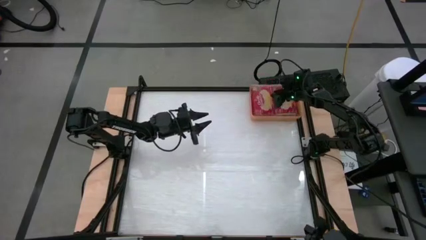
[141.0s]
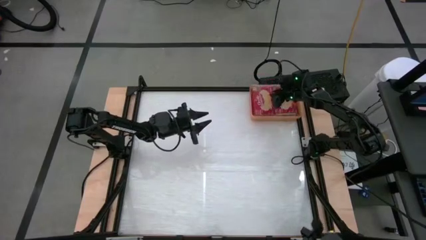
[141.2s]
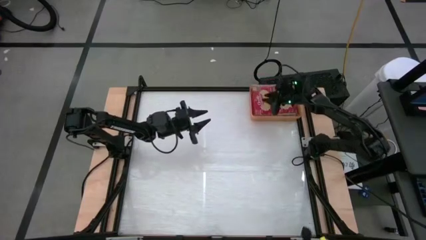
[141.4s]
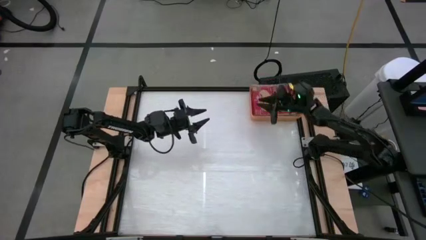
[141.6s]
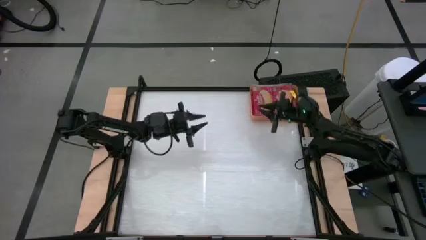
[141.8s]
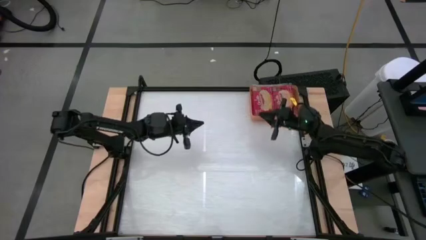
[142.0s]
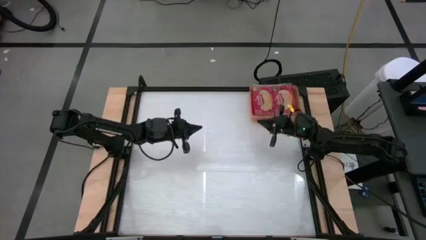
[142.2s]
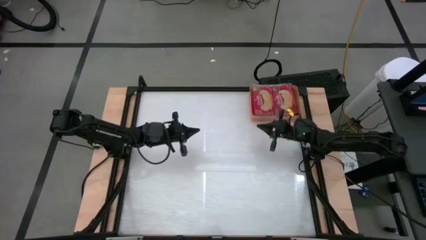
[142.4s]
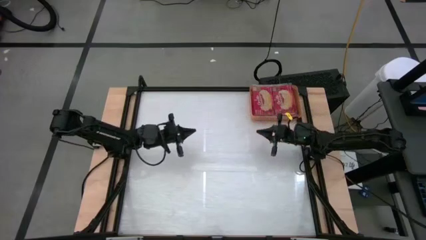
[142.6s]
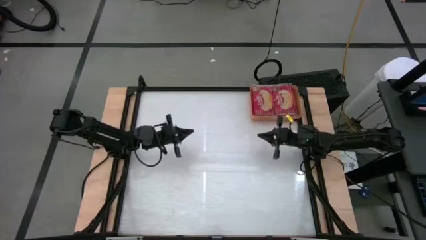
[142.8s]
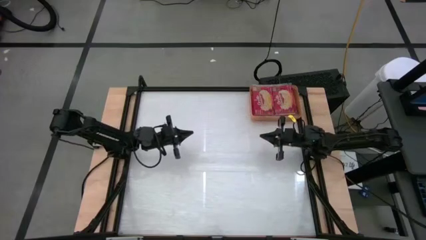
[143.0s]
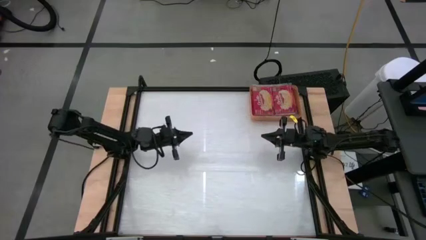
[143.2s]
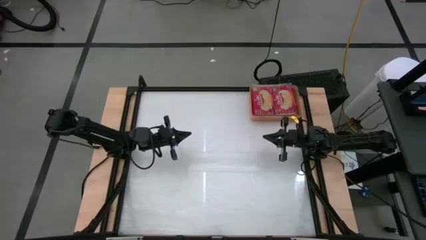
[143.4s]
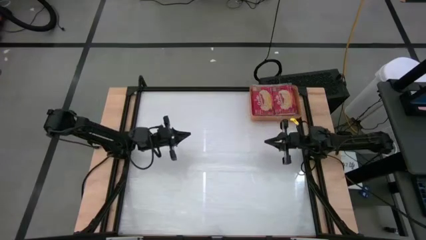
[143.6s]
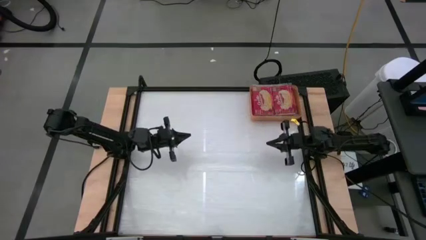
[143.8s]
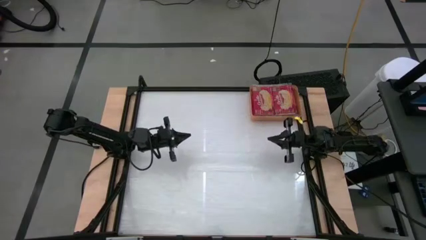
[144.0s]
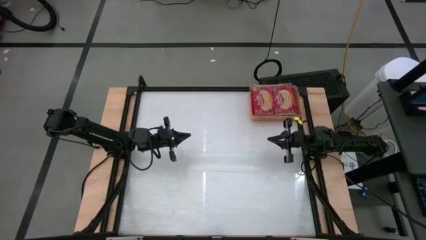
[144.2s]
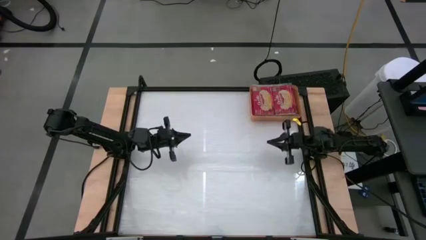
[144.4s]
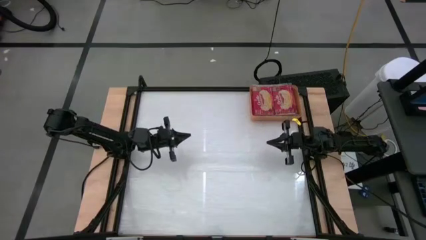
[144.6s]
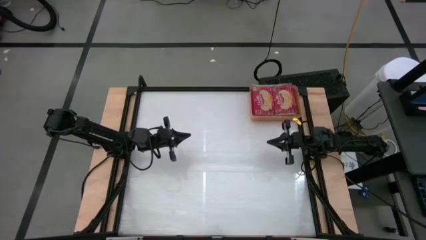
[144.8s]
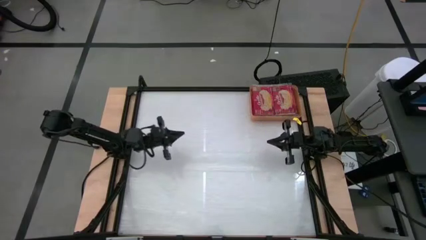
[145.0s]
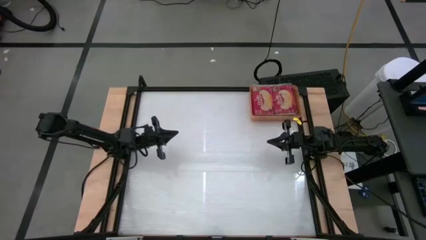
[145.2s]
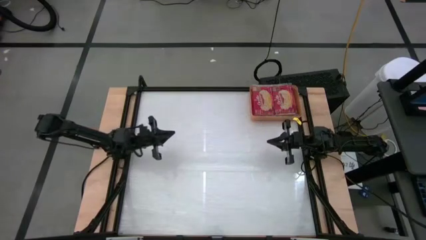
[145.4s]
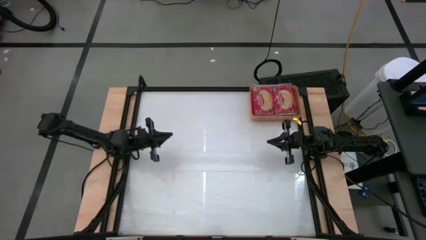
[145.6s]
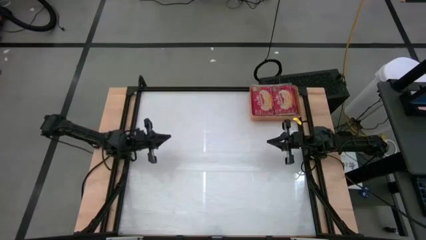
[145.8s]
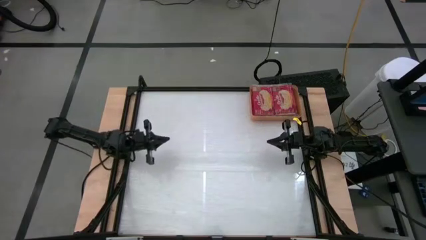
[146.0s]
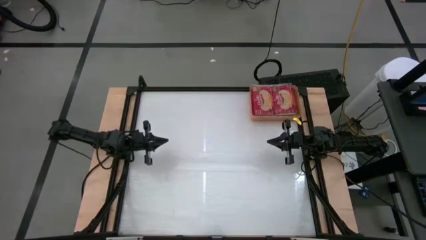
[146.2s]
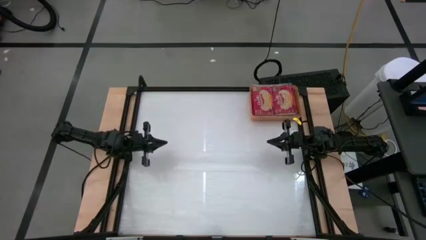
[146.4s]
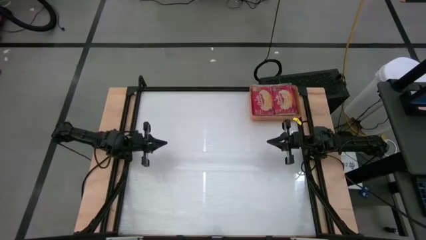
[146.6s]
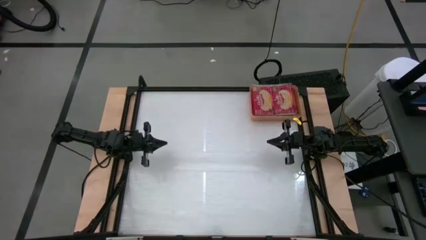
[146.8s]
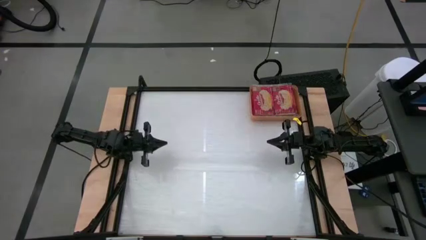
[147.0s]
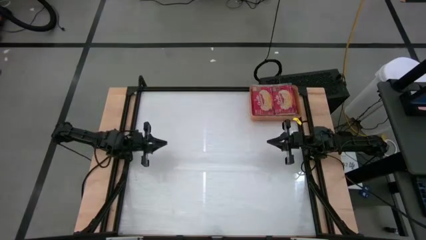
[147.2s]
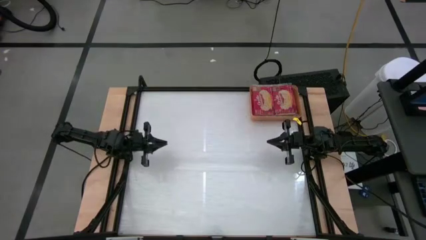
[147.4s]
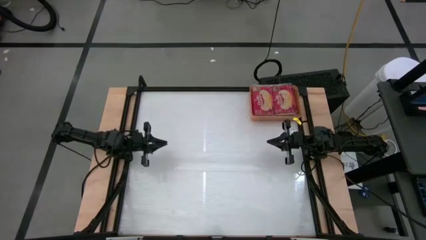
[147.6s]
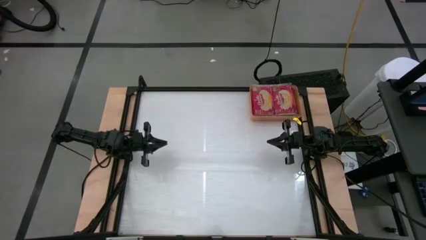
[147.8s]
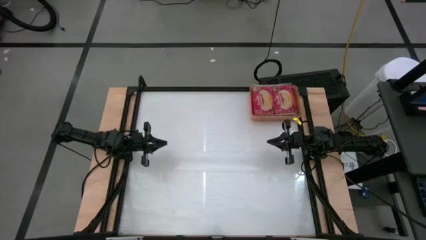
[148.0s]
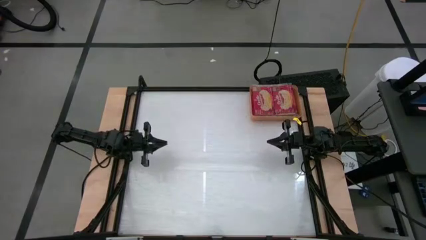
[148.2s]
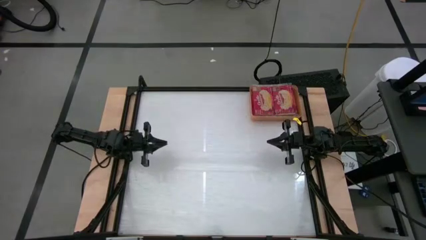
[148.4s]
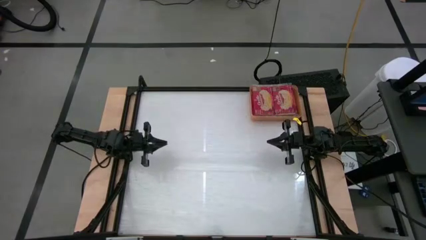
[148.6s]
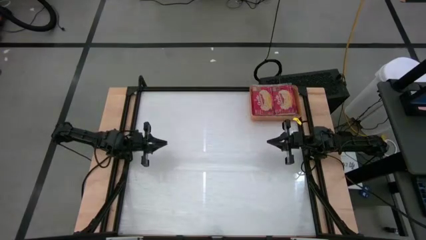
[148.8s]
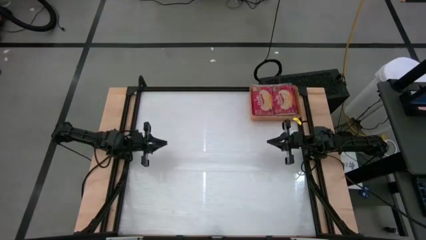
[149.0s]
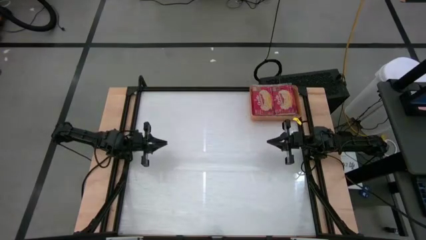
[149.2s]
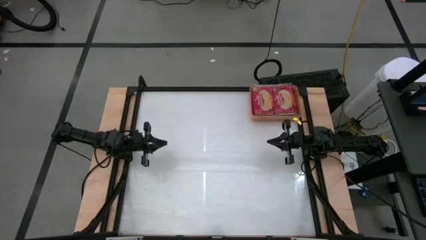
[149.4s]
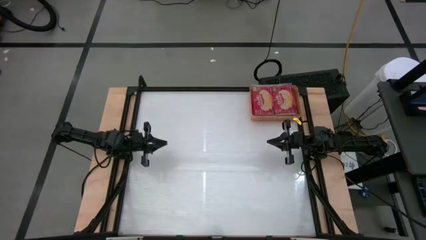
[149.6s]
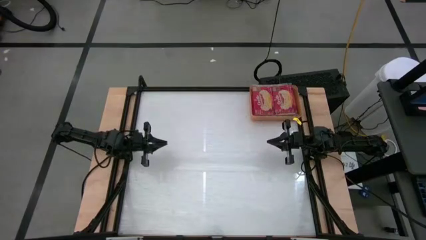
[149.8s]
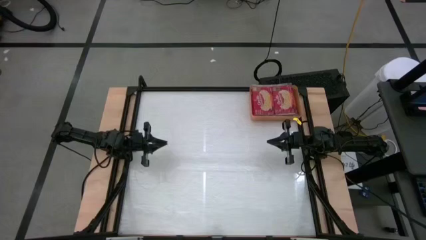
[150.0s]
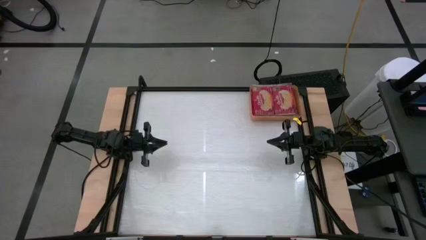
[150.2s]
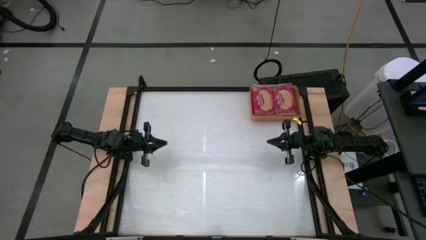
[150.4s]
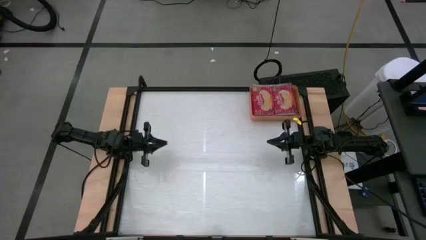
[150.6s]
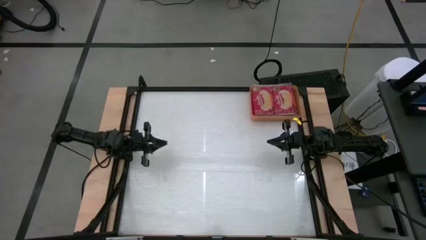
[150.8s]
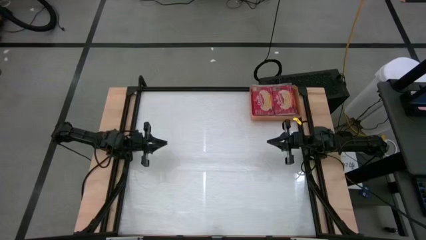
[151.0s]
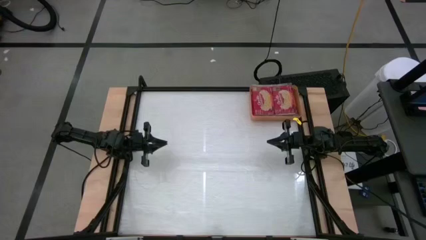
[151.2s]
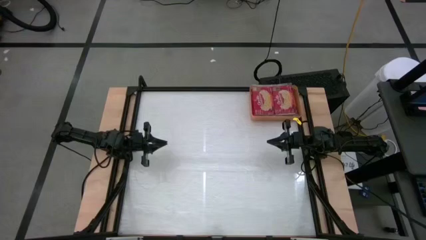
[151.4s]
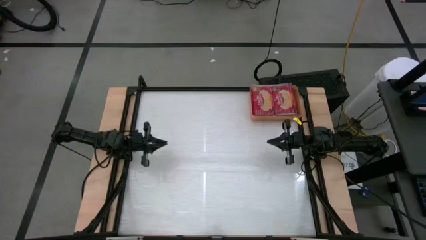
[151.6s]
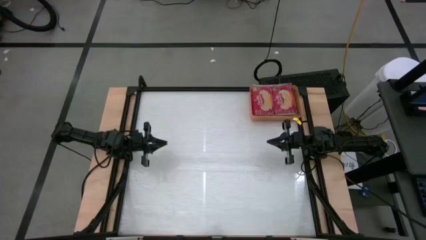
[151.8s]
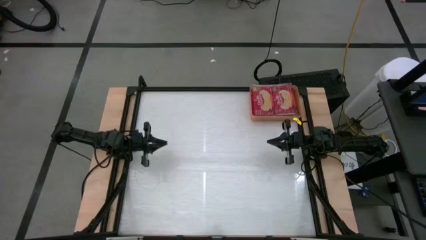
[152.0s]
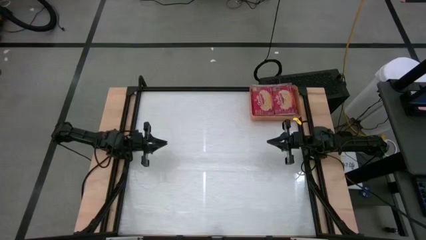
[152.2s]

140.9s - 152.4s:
Task: Sort popcorn bags into baskets
Return to Home Position
